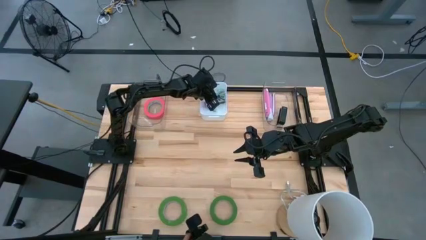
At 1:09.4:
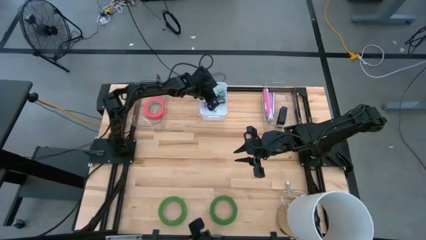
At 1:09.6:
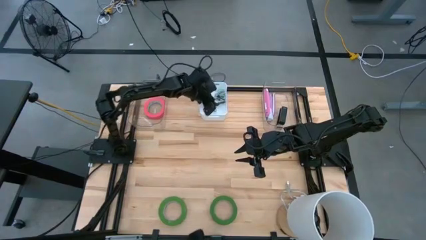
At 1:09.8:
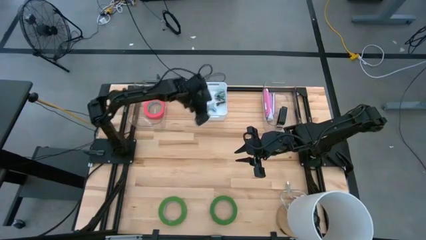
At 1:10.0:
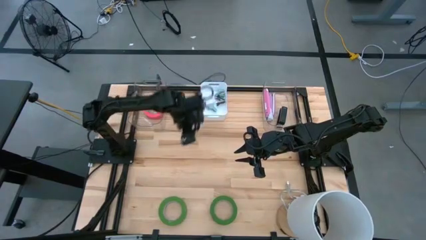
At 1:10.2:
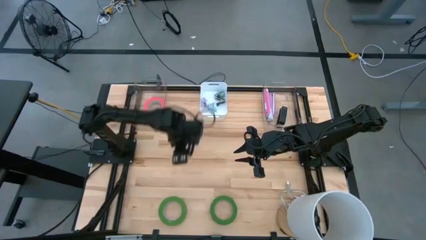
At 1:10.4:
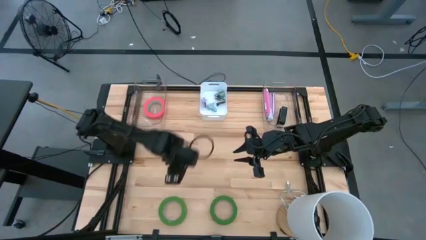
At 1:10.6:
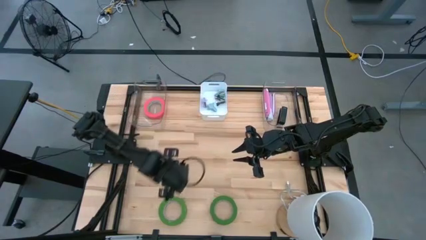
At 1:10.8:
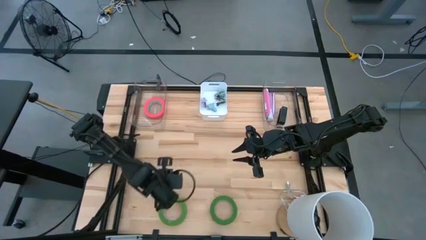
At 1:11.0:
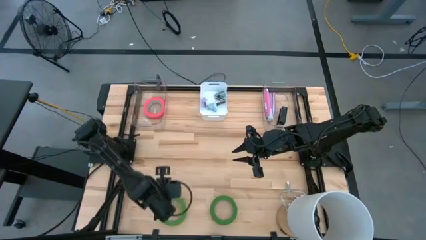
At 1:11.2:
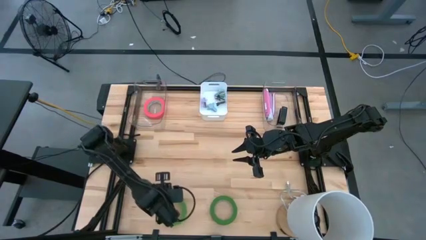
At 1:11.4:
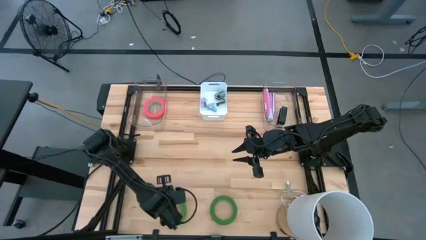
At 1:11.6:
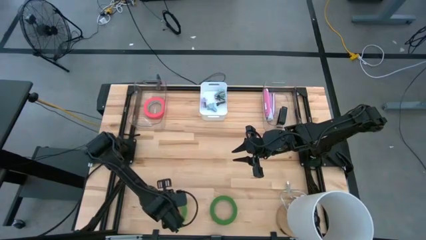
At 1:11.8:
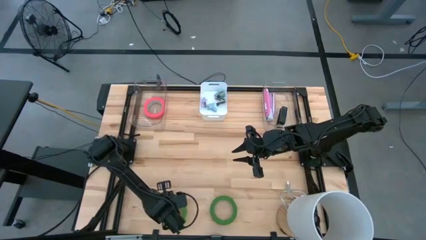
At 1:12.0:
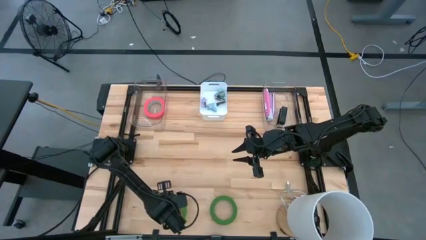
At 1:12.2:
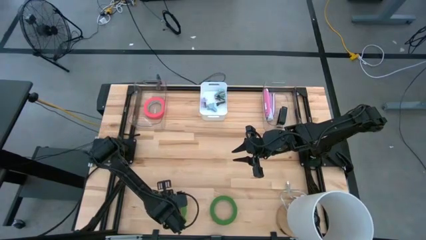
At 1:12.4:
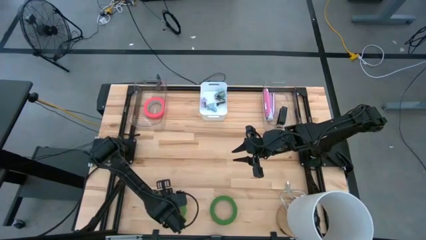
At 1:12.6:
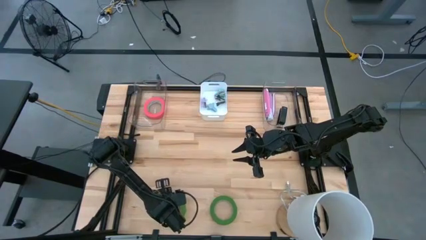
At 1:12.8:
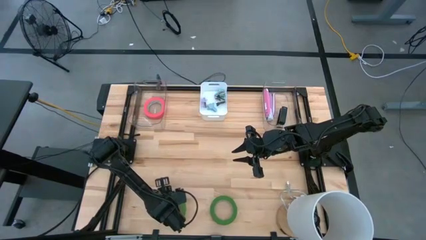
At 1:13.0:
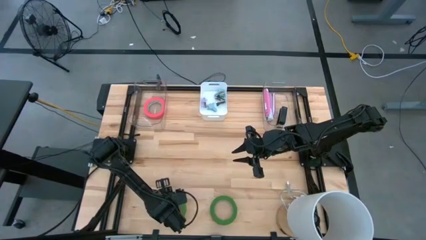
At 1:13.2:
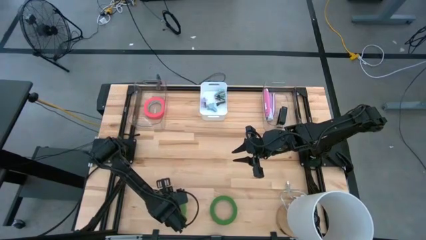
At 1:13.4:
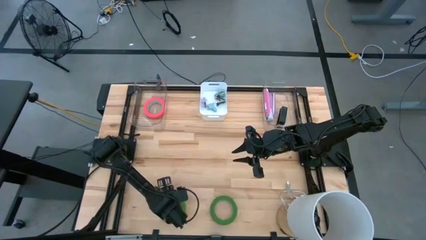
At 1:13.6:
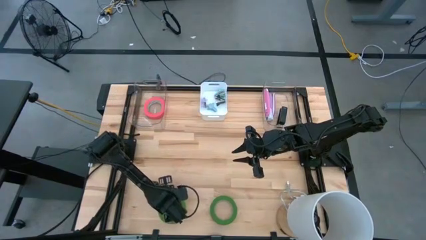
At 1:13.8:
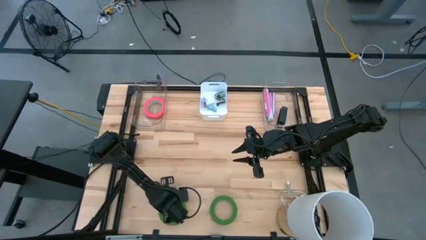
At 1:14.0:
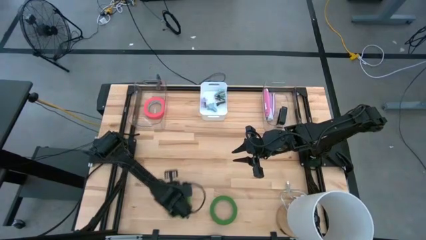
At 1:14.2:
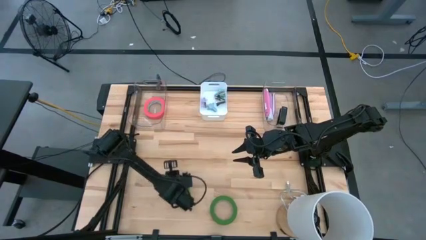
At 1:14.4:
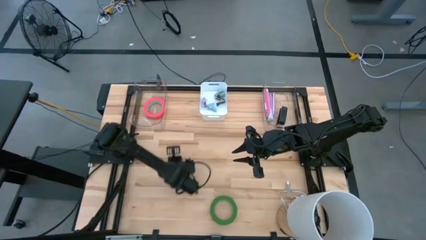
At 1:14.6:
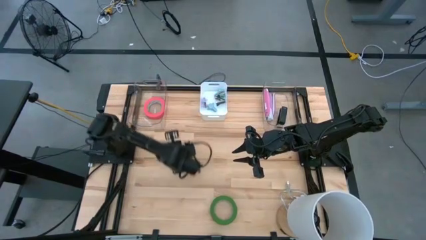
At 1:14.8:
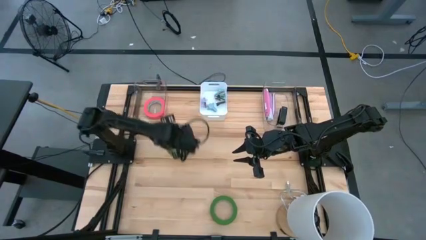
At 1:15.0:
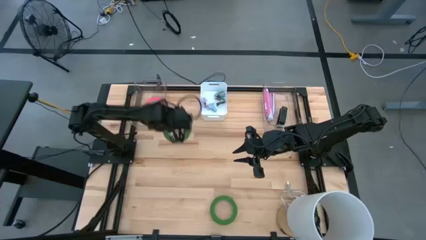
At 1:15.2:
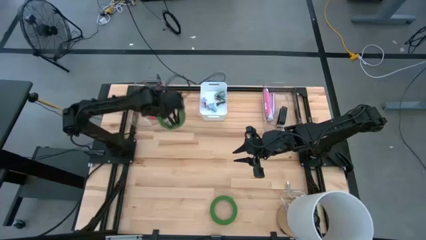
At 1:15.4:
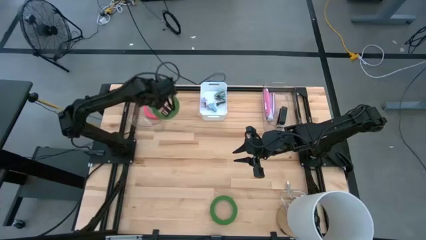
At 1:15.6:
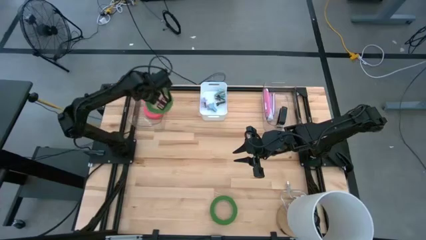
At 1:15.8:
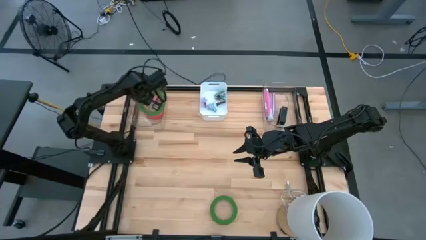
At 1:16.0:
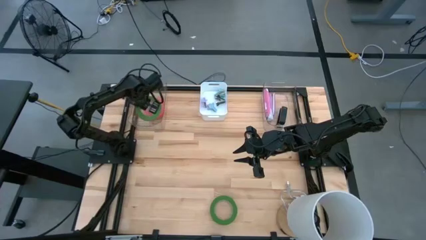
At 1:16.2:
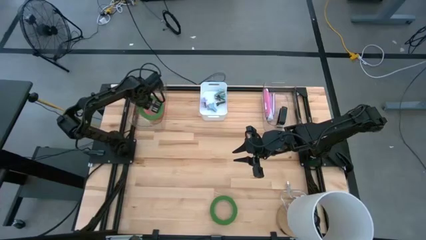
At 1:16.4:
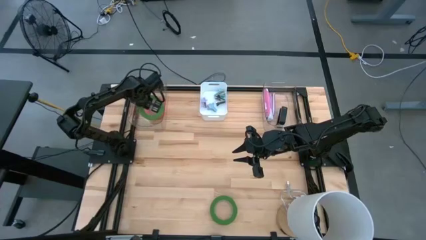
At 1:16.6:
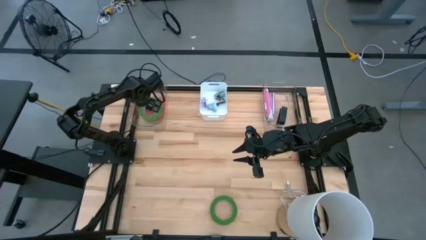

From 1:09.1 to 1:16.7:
Task: Pick and place Stapler, Stapler remover, tape
Put the left green tape into the left transparent bin

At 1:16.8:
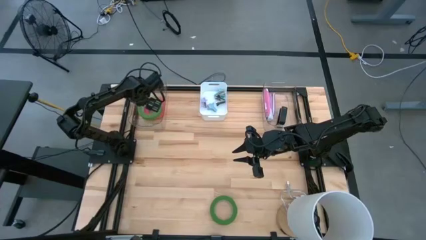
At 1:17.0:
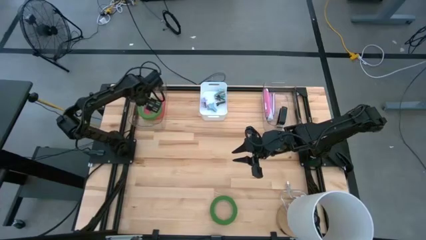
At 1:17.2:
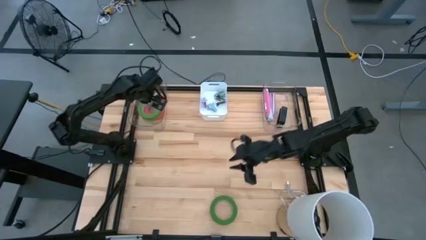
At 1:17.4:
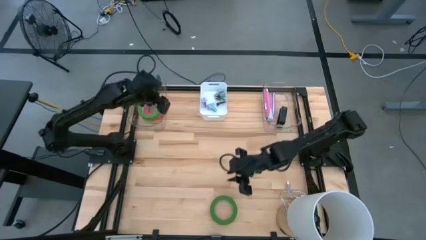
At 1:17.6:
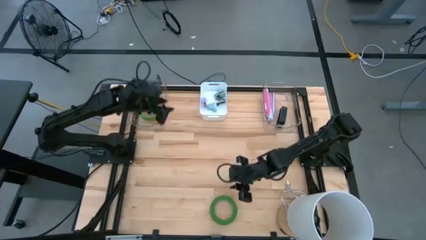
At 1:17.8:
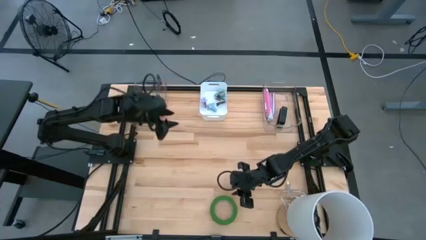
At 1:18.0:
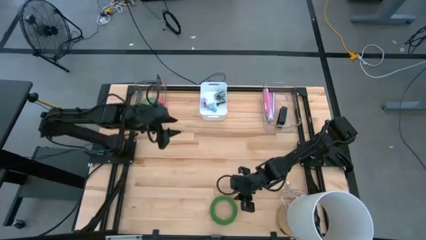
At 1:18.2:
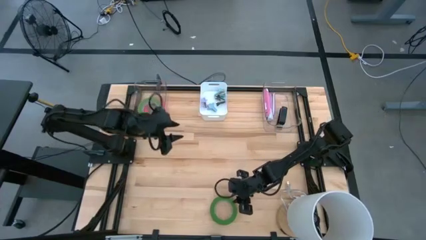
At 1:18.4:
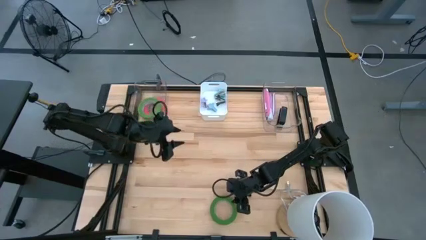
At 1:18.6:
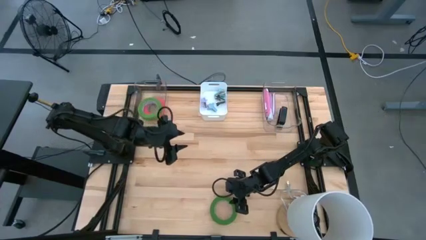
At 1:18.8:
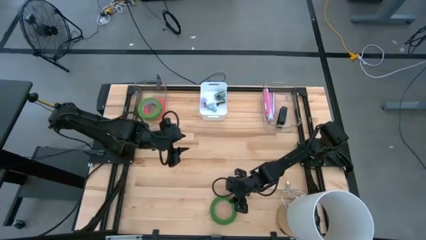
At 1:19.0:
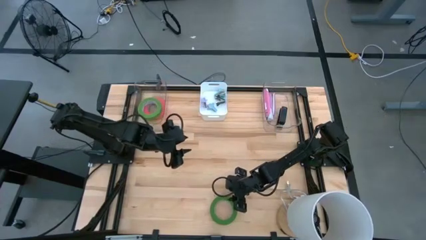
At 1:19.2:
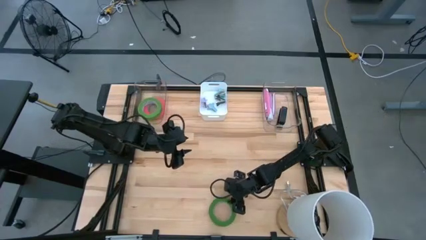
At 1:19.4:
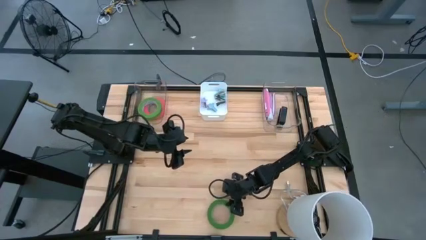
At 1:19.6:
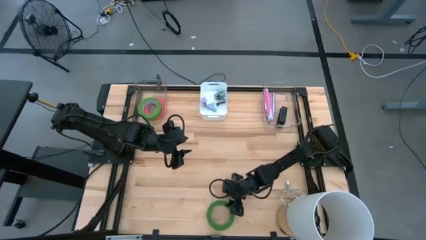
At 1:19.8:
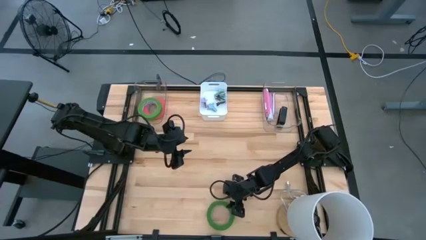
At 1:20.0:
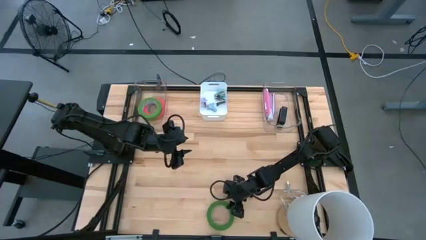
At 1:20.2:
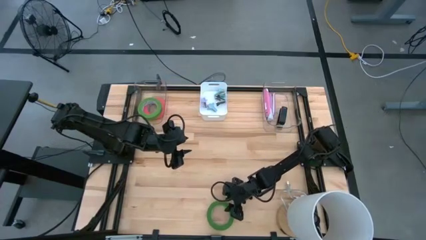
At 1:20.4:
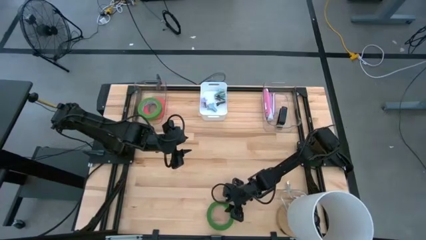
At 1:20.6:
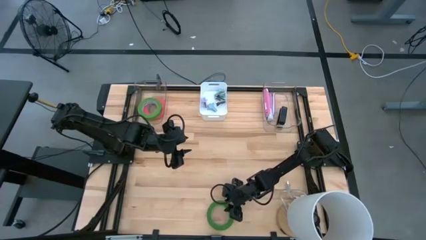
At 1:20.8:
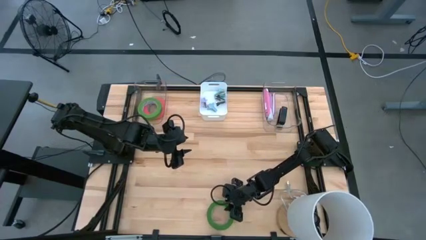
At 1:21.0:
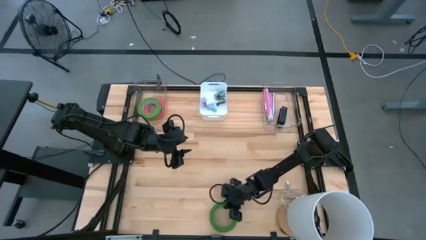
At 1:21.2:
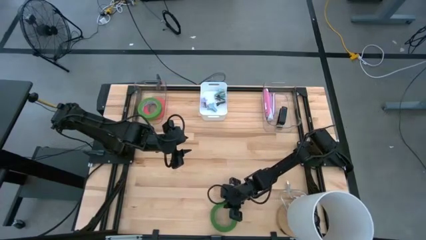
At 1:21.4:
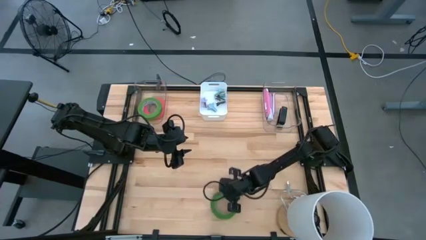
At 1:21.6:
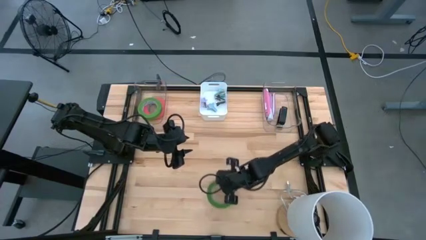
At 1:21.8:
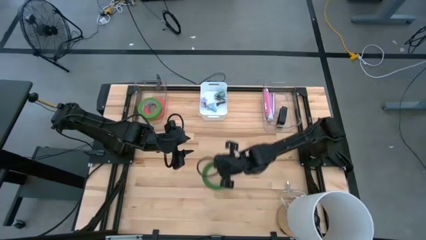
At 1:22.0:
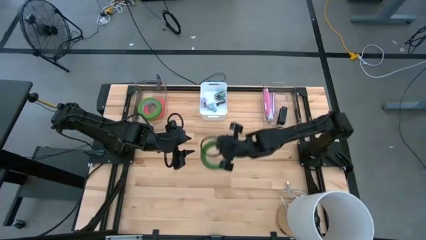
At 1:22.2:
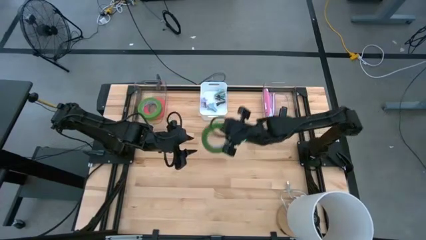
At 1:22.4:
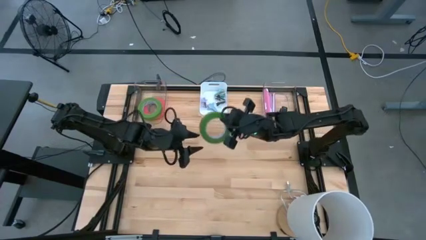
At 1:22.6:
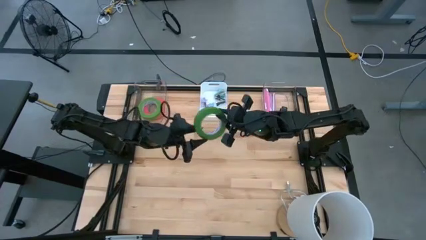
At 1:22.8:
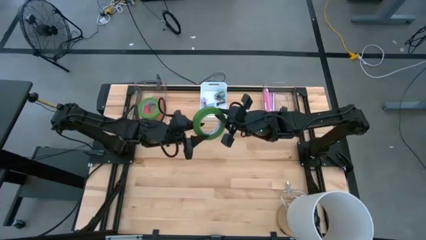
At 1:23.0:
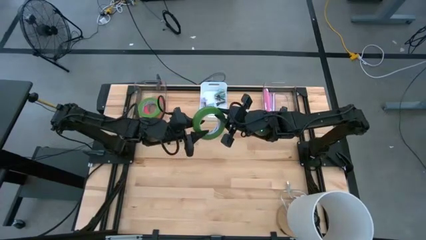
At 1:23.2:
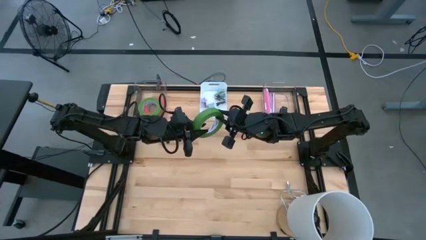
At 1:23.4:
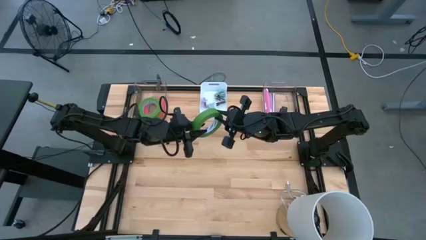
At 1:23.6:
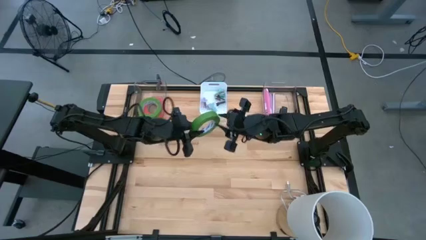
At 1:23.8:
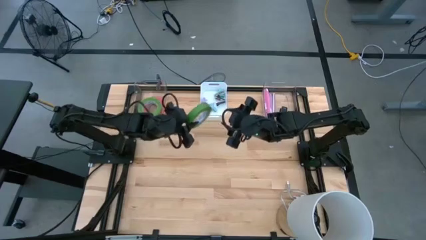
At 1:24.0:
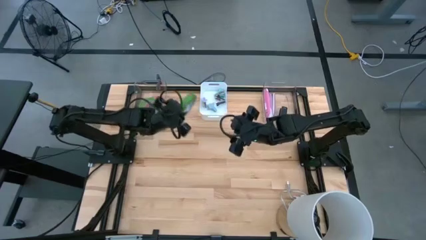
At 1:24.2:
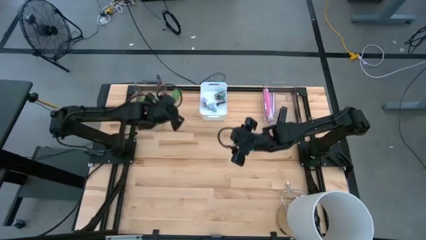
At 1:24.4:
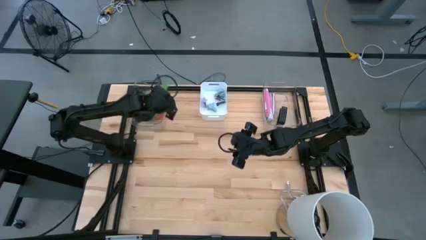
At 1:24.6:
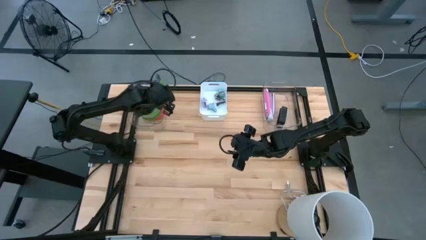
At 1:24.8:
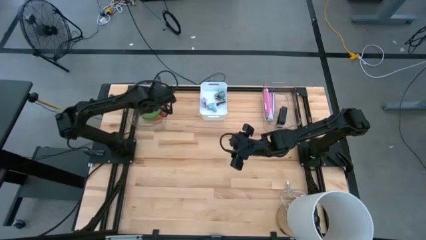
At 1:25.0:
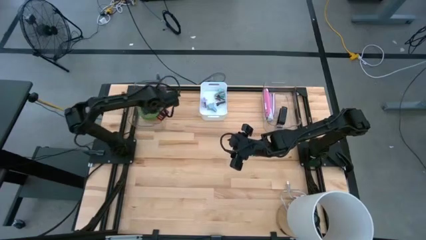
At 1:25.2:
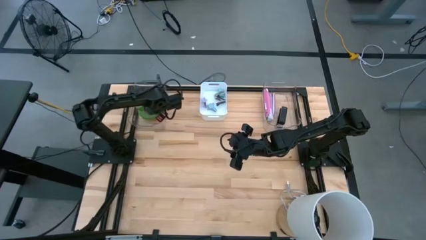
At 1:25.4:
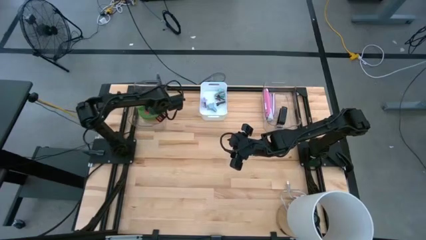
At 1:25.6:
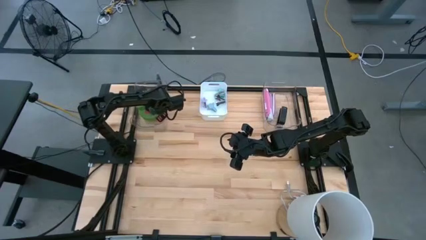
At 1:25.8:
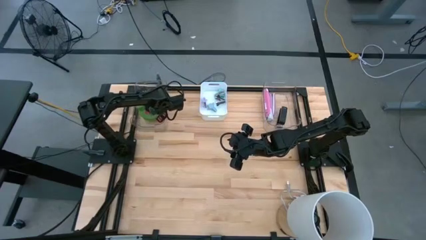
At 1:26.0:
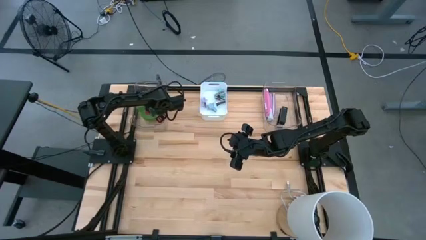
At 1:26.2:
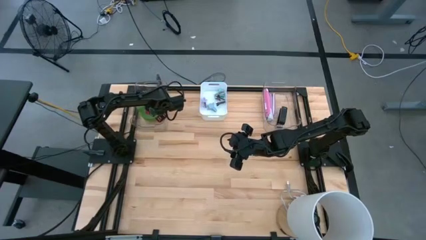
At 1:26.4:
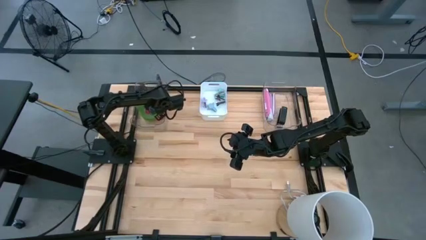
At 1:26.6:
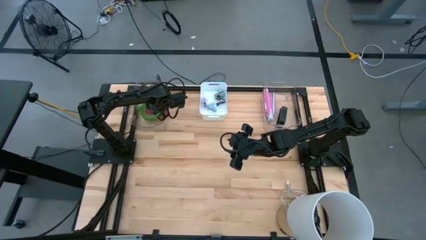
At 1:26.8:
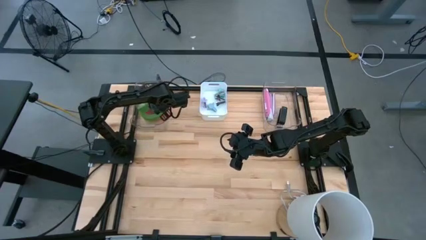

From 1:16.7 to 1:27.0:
Put the green tape into the left transparent bin
